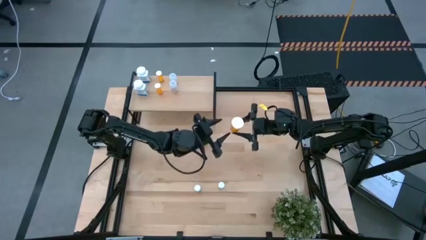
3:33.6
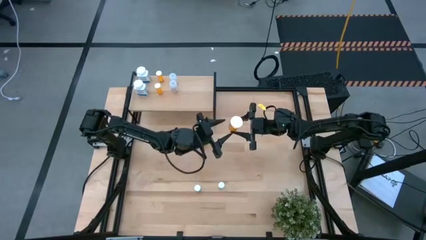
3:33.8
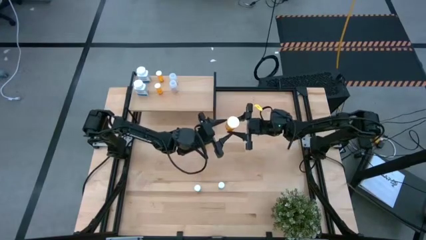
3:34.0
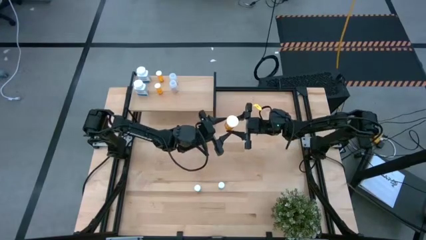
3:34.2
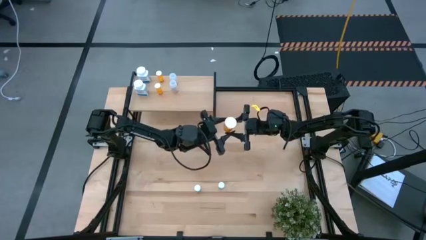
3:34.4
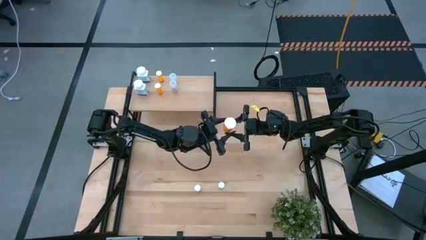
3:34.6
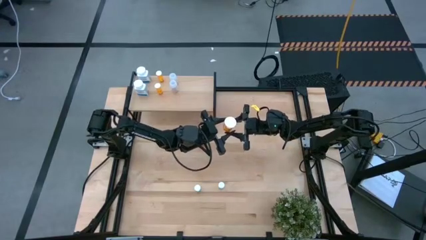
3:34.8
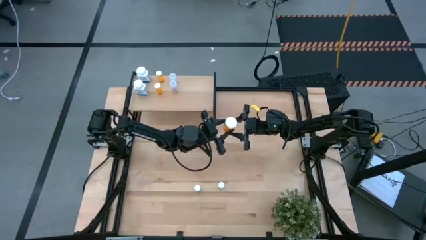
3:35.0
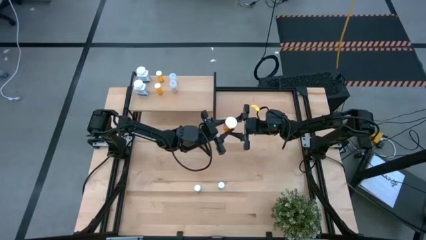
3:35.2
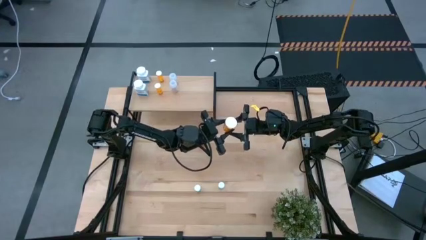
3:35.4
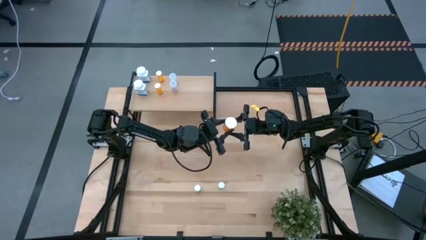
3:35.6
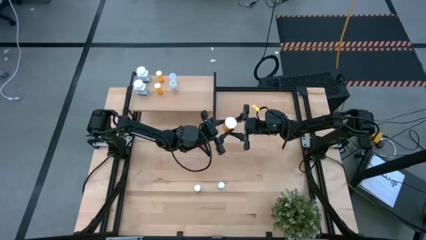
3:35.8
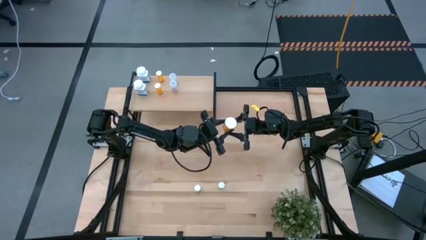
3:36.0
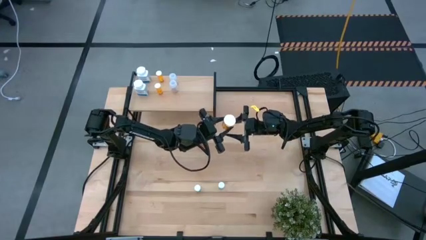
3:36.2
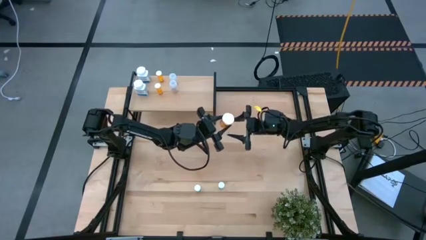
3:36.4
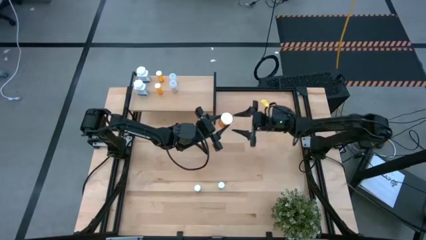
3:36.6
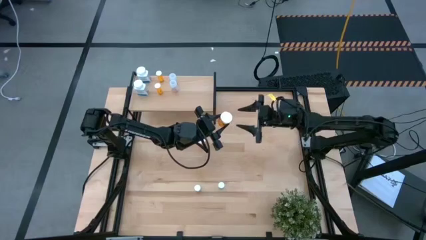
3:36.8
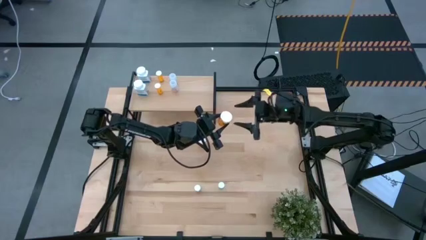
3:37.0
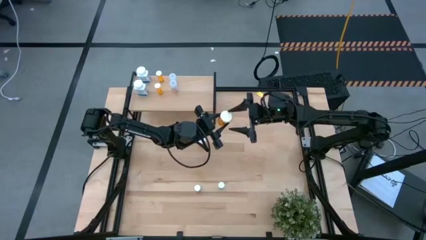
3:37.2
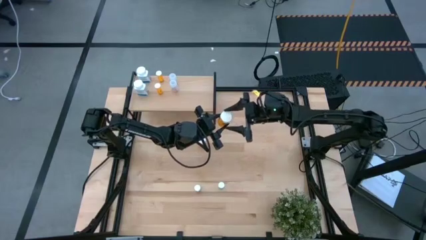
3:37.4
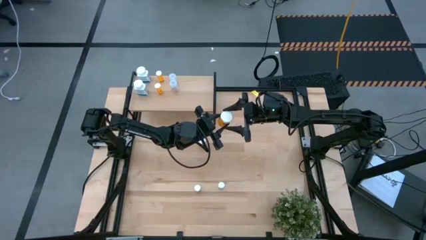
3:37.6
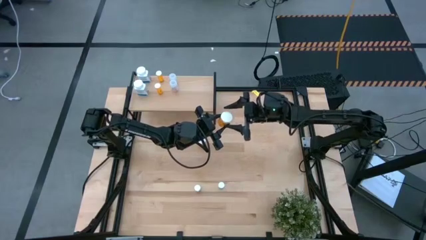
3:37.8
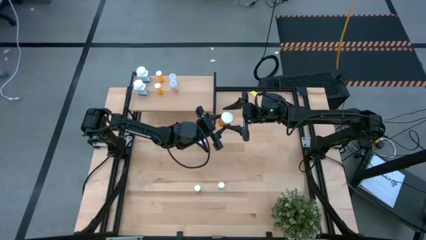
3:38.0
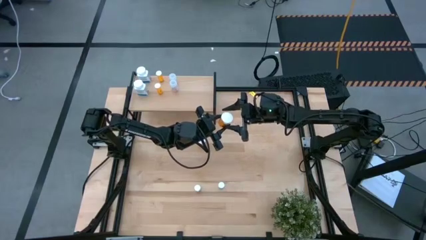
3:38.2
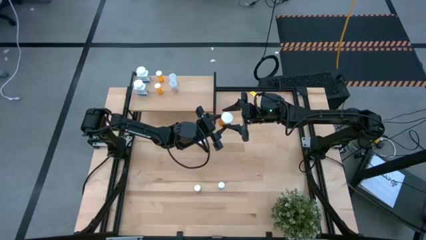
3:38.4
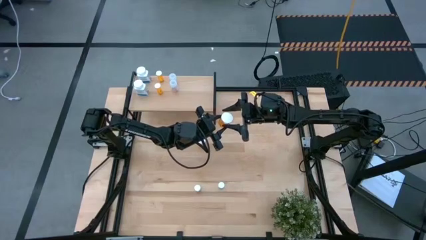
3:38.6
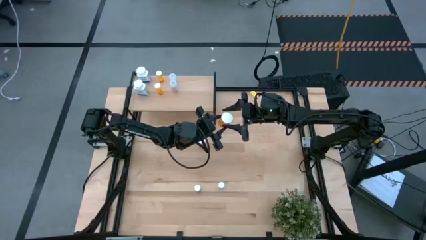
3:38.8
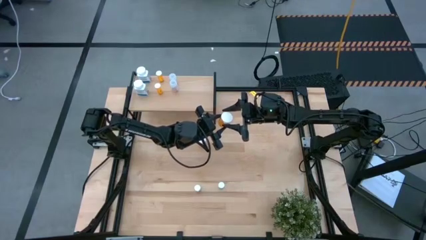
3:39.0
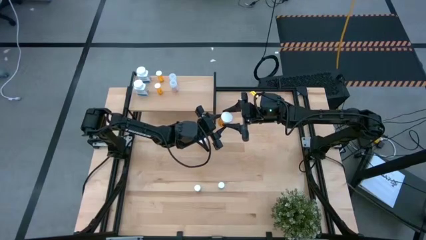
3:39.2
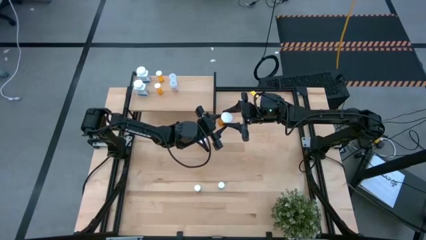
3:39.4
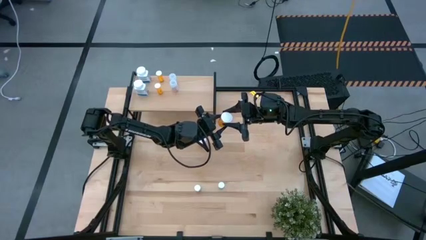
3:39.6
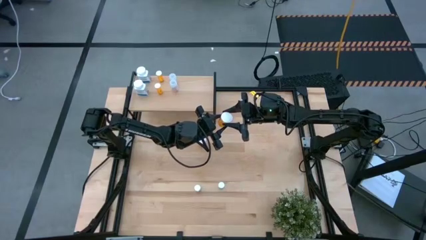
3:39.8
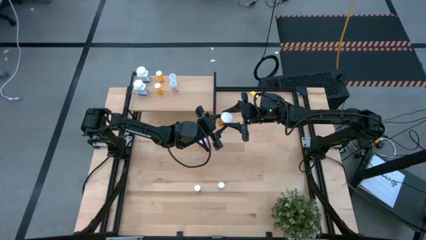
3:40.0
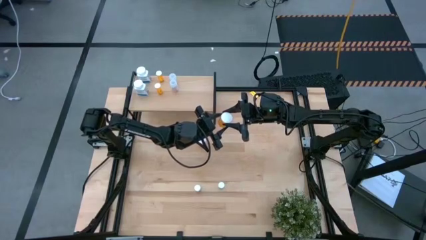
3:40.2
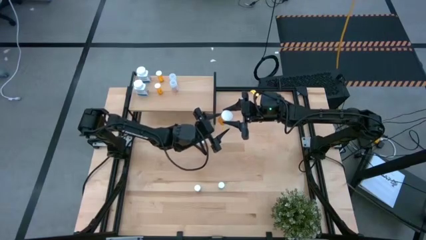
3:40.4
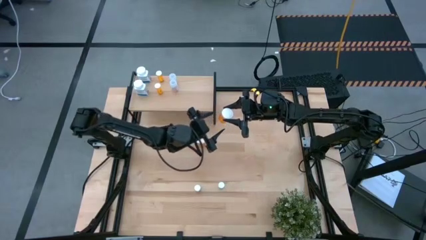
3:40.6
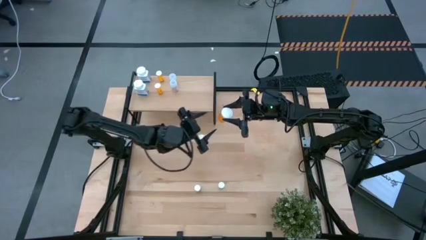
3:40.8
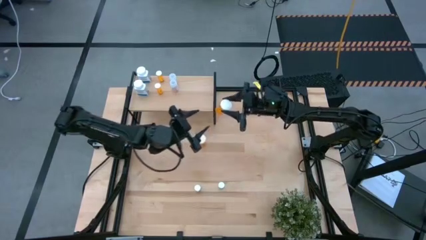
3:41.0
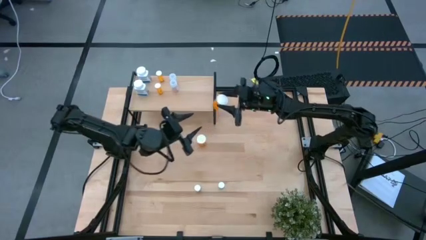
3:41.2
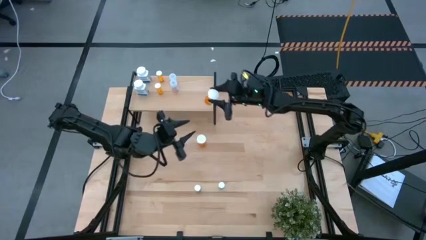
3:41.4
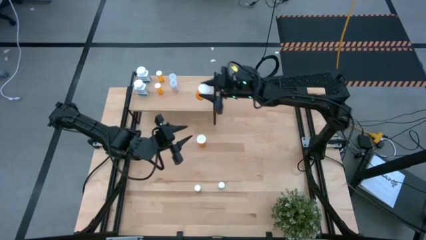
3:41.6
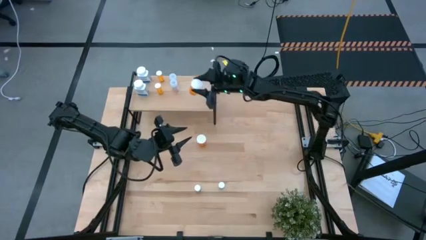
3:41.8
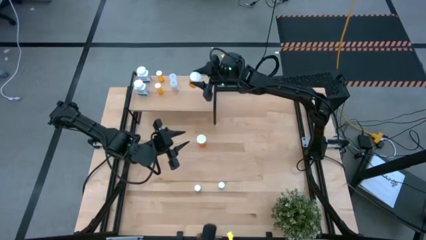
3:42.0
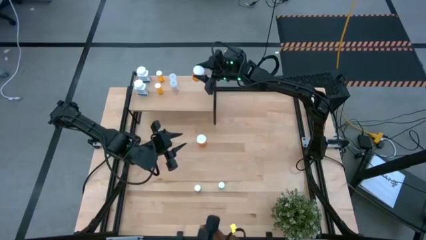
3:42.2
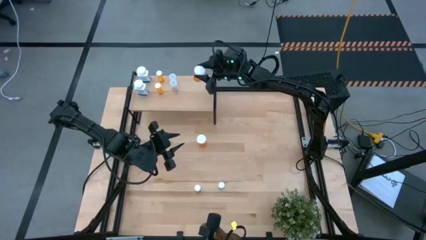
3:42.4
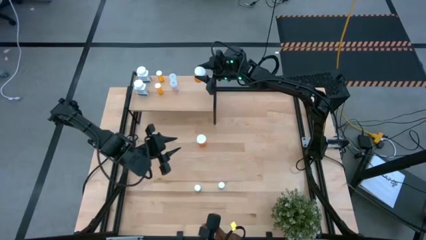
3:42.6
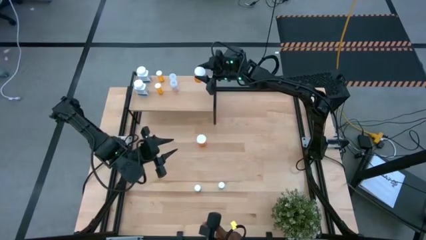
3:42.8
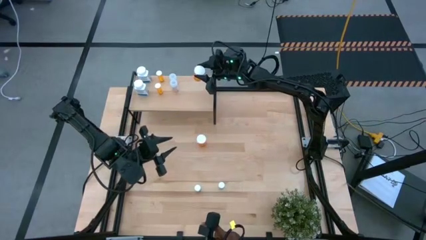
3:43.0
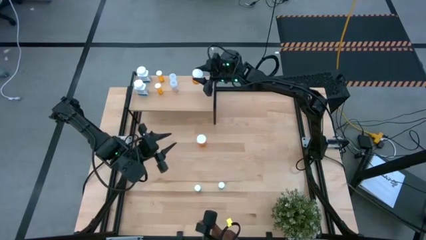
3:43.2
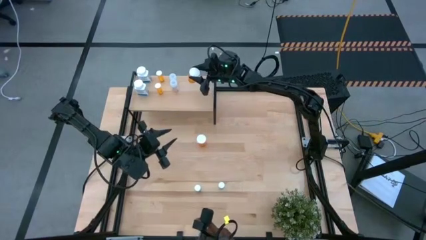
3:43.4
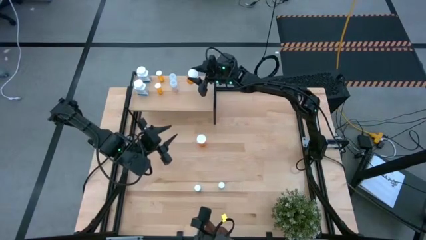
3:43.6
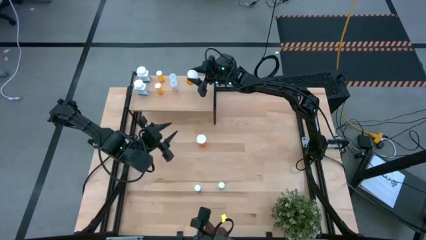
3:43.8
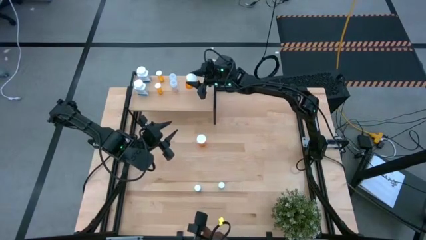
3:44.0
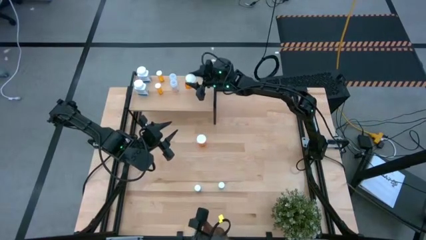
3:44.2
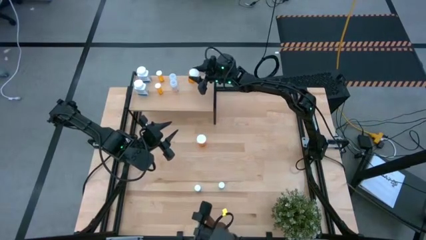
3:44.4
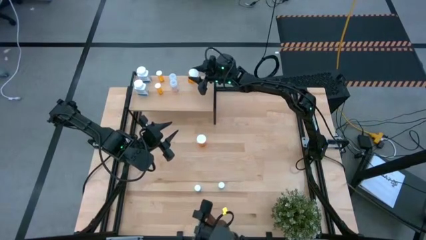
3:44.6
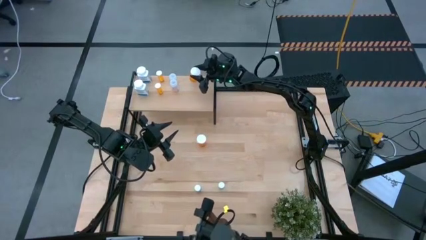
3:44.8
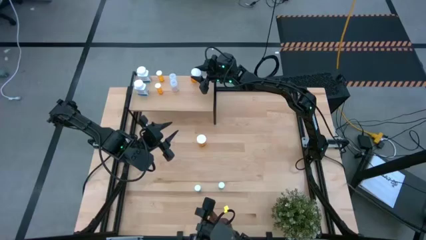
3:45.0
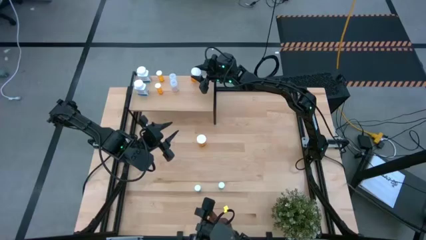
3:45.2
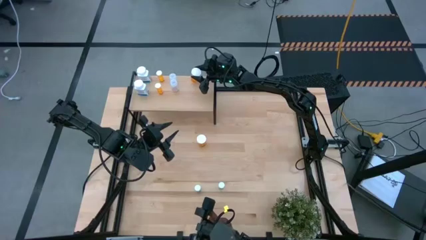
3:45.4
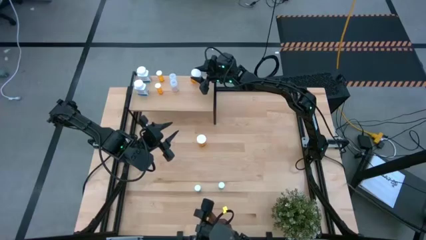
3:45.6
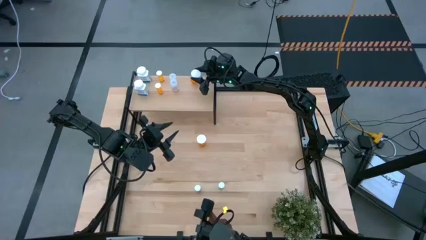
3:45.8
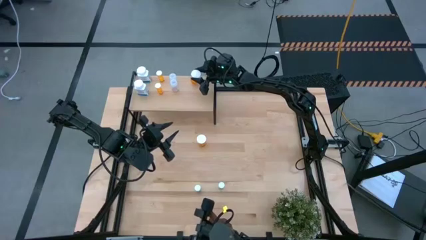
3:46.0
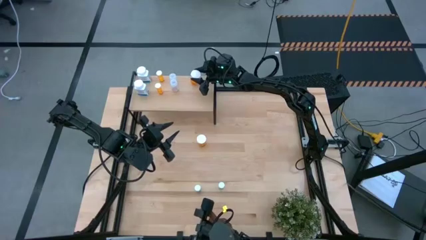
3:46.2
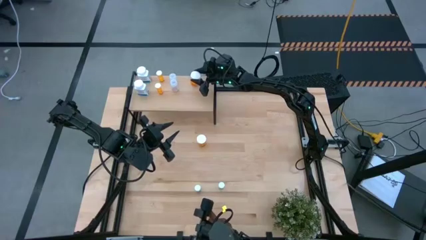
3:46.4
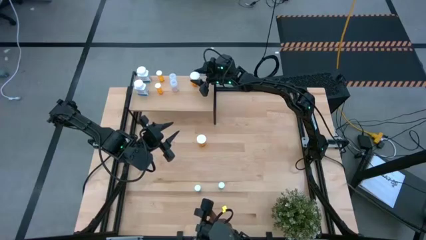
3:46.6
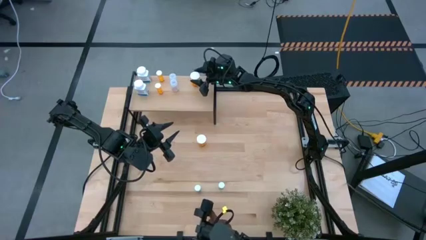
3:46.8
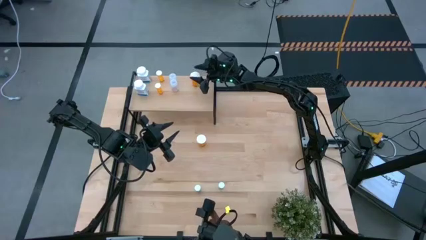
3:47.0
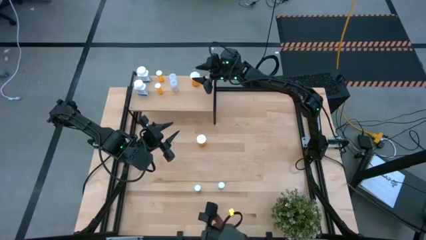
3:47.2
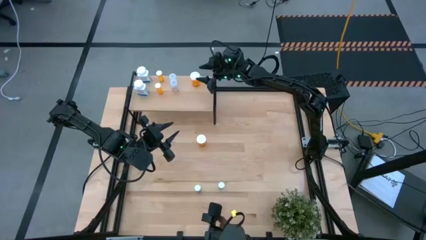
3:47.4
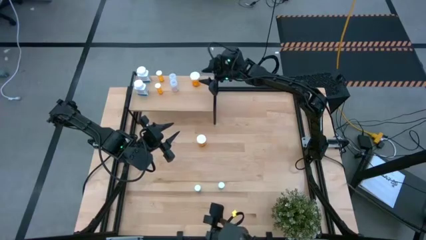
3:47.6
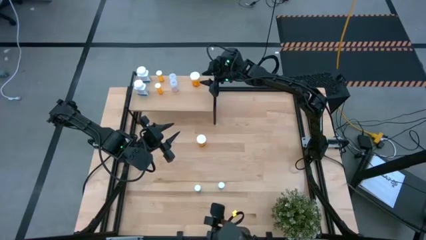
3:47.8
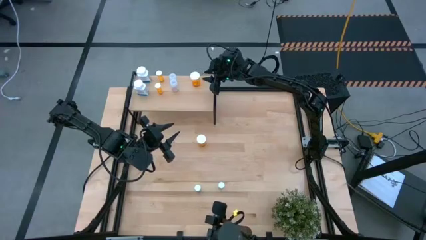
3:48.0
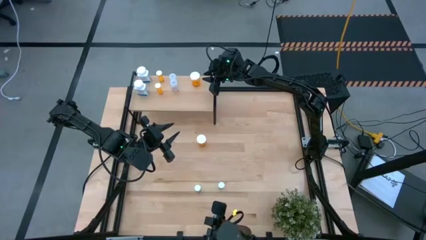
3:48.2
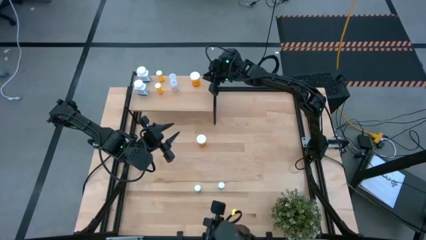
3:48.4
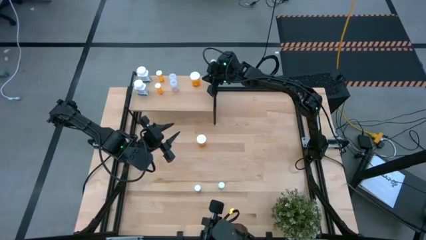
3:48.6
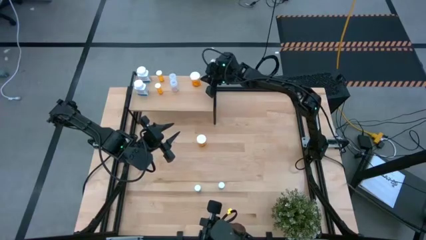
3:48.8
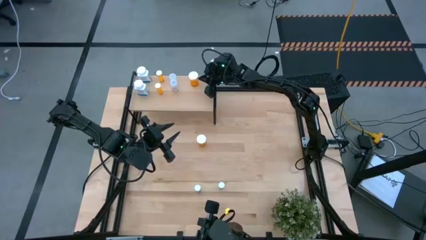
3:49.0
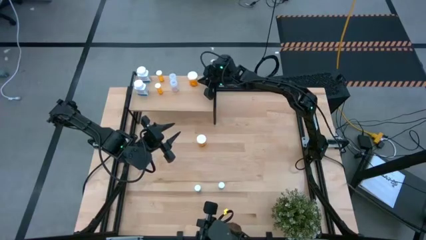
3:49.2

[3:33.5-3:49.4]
Task: Pick and place medicine bottles onto shelf by color
Put the bottom large orange pill bottle on the shelf
